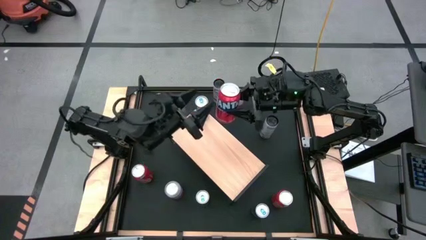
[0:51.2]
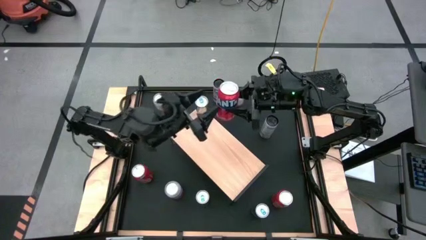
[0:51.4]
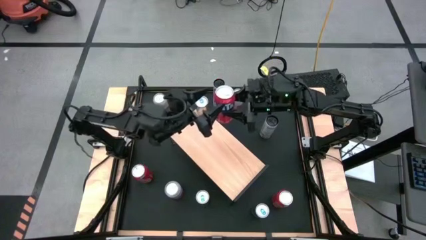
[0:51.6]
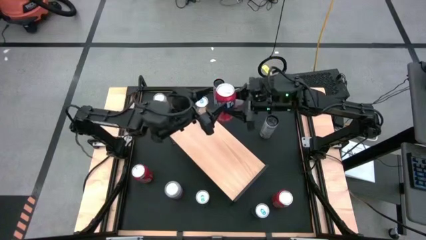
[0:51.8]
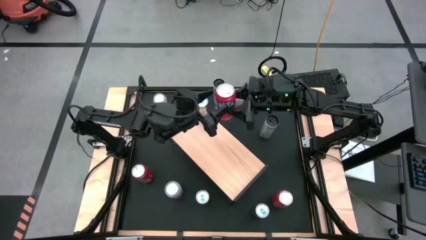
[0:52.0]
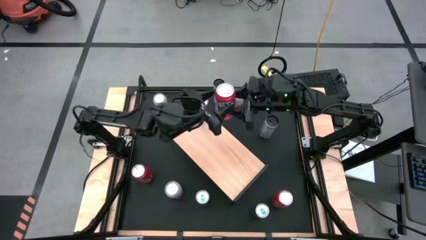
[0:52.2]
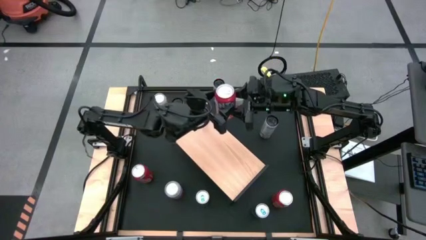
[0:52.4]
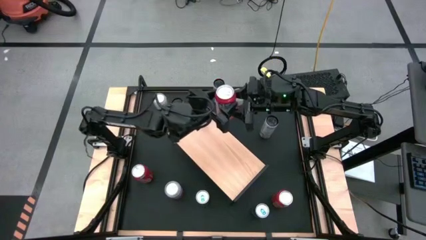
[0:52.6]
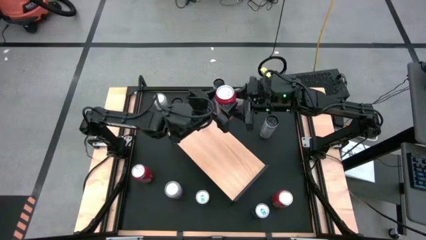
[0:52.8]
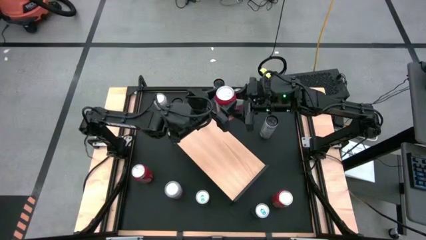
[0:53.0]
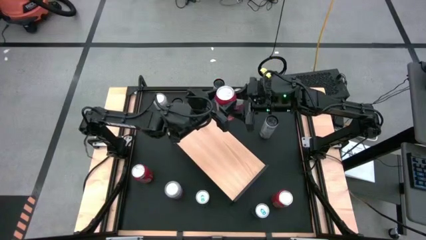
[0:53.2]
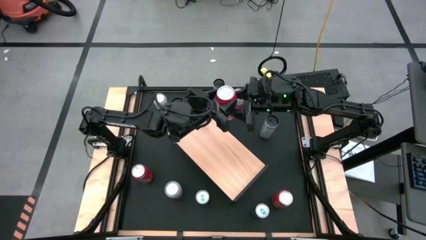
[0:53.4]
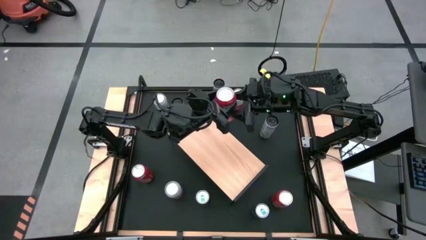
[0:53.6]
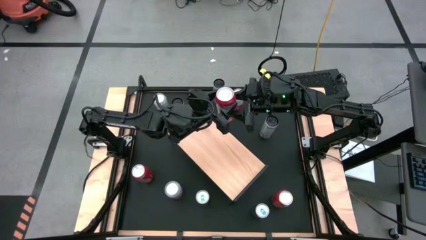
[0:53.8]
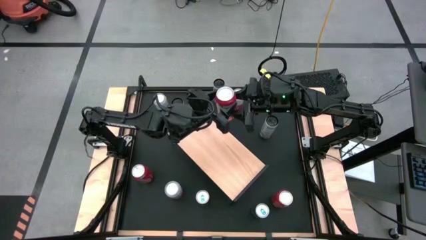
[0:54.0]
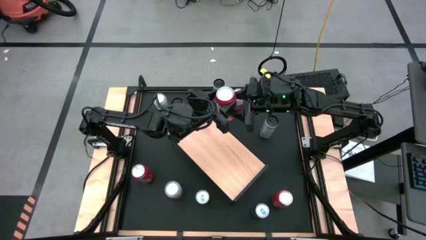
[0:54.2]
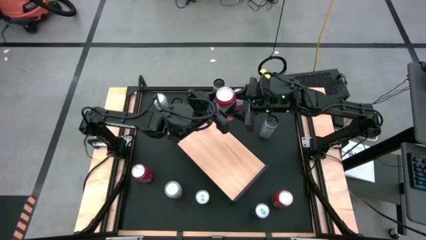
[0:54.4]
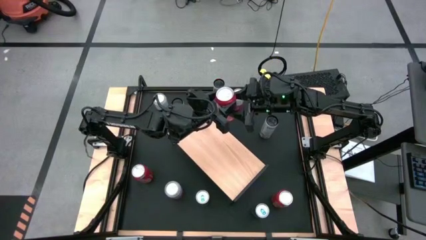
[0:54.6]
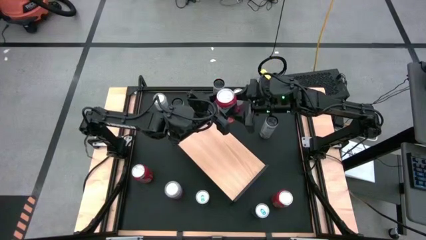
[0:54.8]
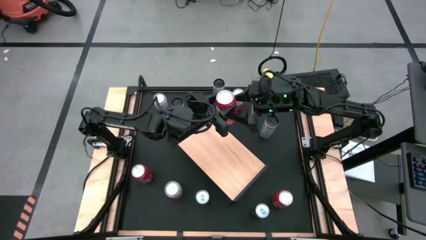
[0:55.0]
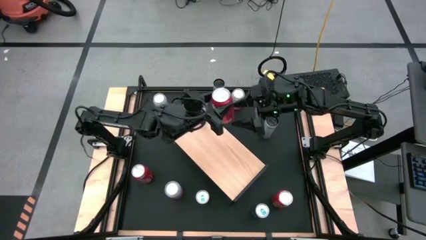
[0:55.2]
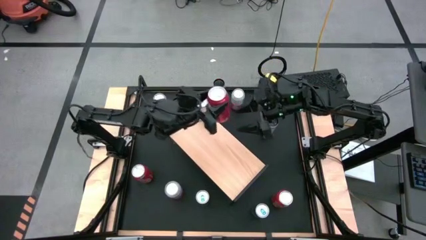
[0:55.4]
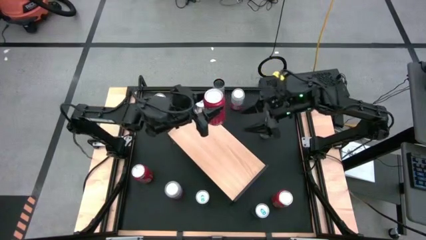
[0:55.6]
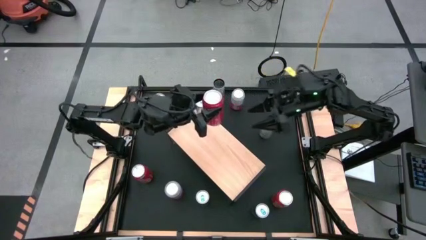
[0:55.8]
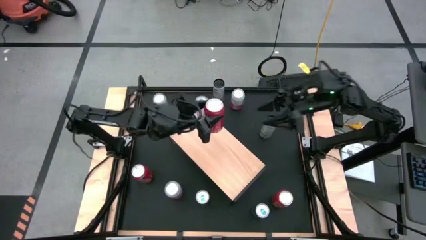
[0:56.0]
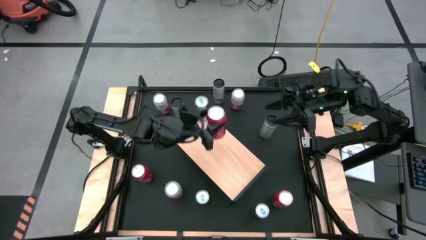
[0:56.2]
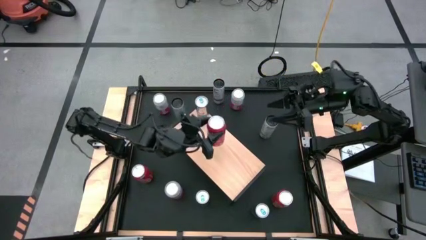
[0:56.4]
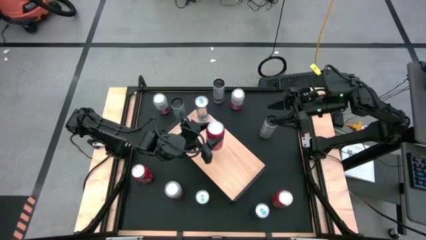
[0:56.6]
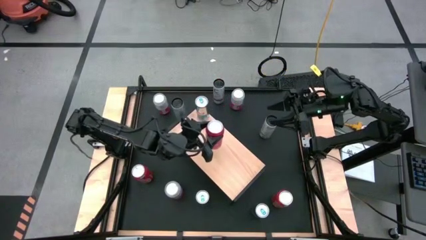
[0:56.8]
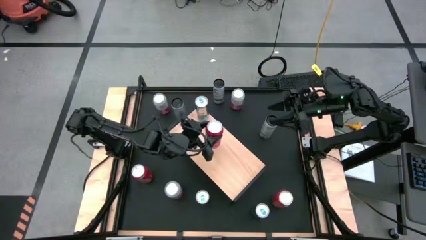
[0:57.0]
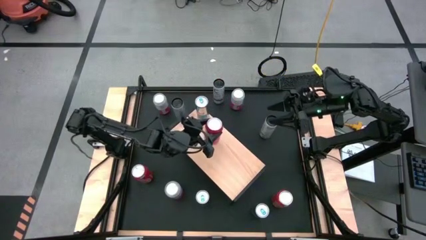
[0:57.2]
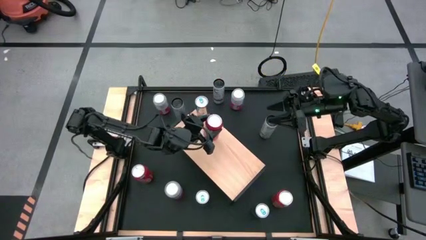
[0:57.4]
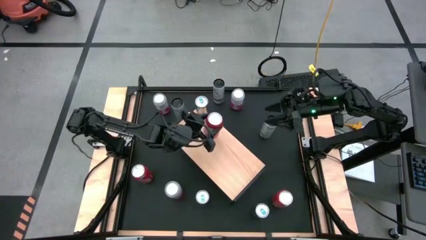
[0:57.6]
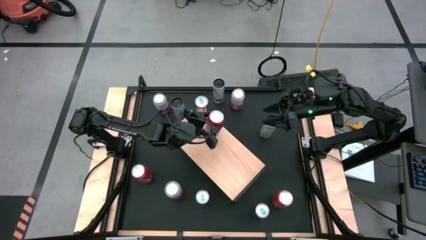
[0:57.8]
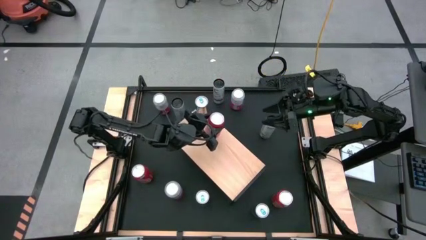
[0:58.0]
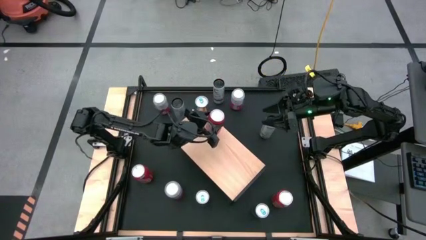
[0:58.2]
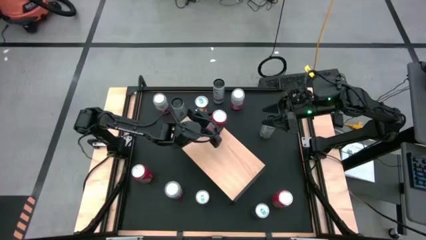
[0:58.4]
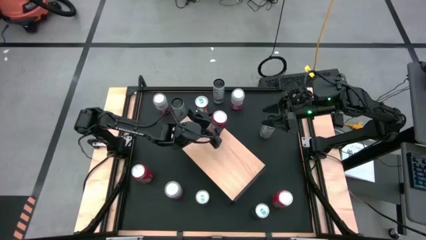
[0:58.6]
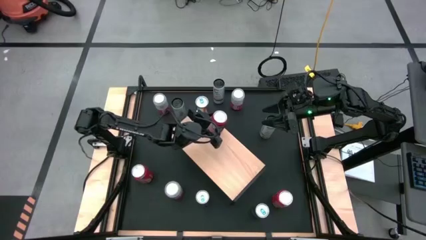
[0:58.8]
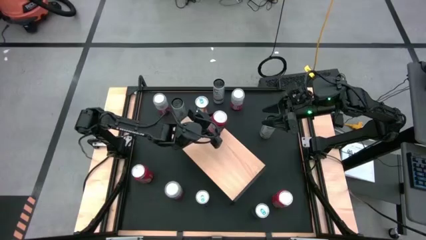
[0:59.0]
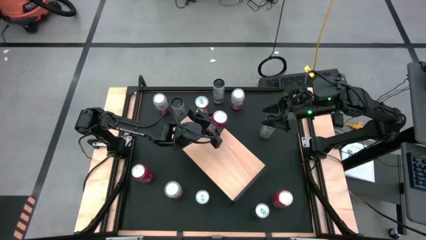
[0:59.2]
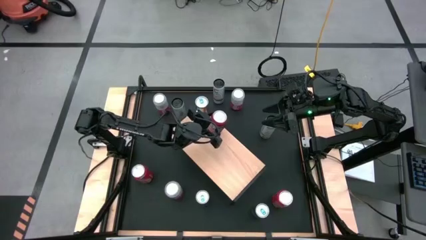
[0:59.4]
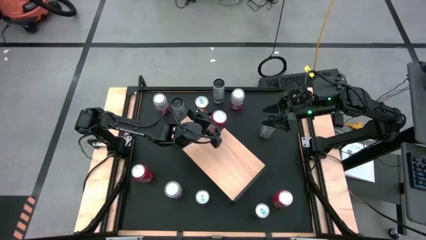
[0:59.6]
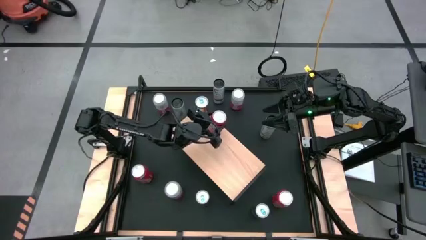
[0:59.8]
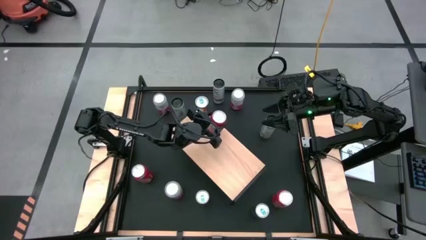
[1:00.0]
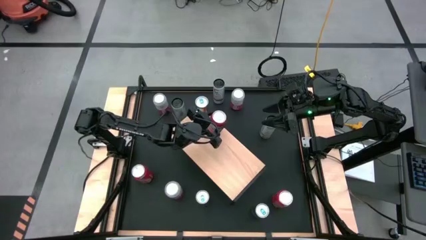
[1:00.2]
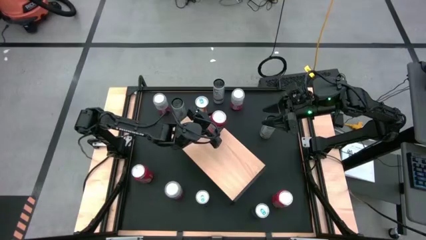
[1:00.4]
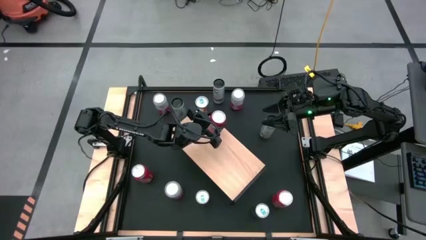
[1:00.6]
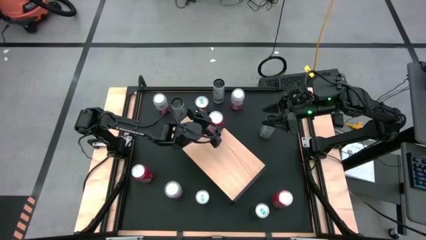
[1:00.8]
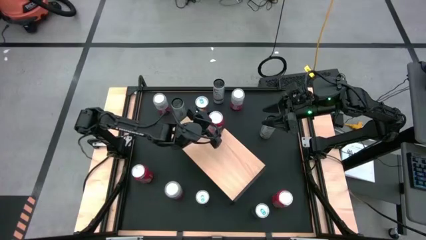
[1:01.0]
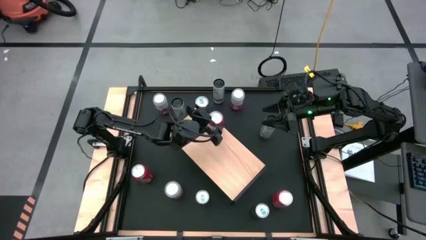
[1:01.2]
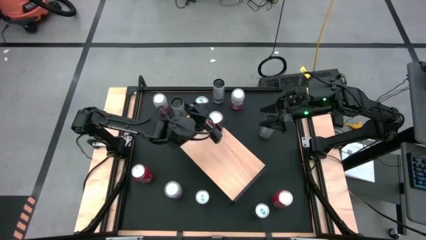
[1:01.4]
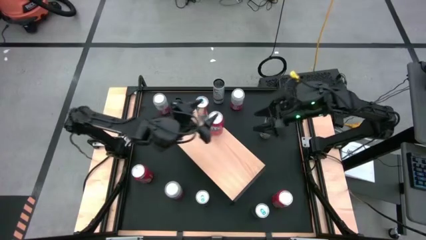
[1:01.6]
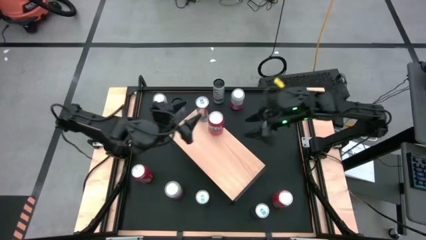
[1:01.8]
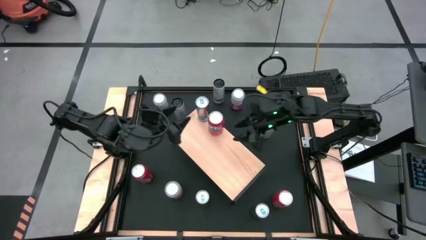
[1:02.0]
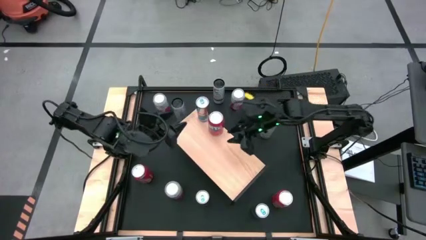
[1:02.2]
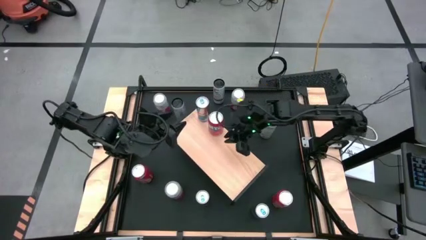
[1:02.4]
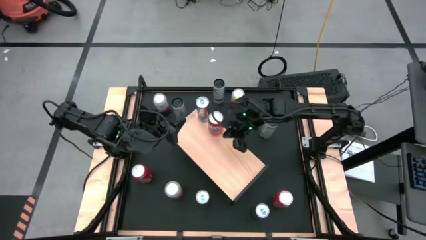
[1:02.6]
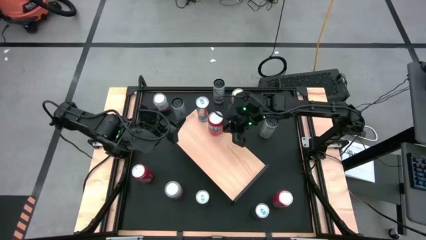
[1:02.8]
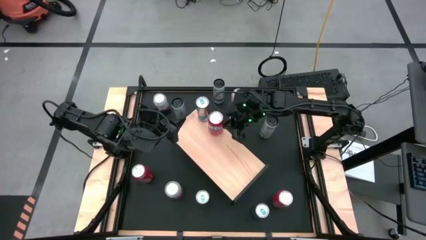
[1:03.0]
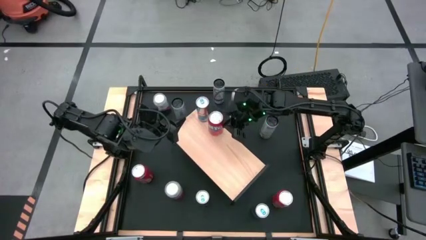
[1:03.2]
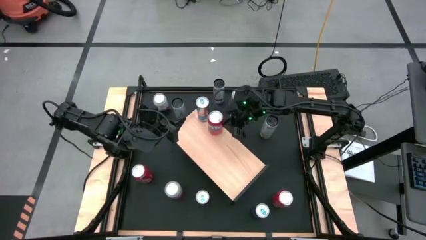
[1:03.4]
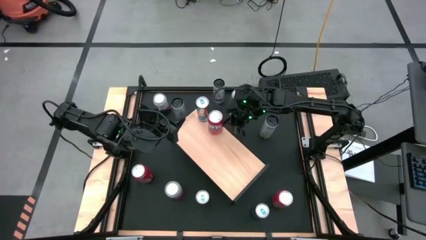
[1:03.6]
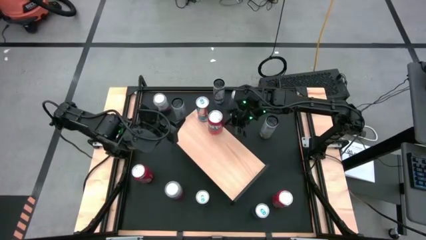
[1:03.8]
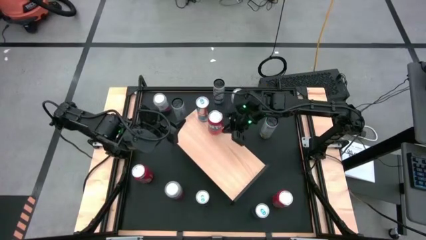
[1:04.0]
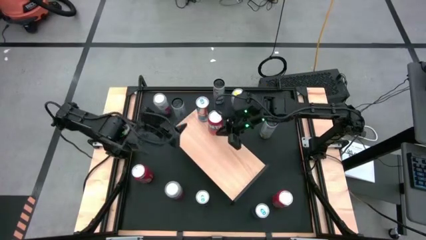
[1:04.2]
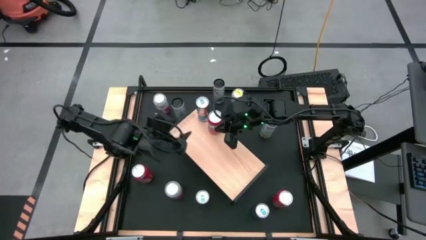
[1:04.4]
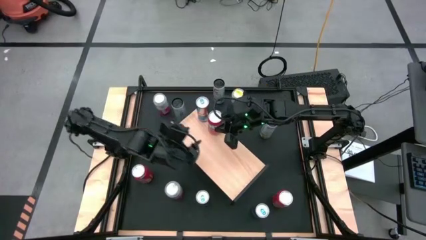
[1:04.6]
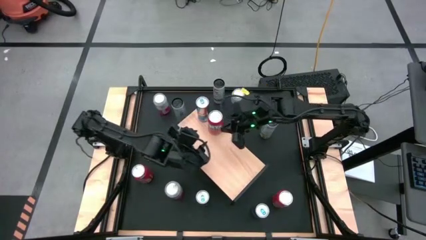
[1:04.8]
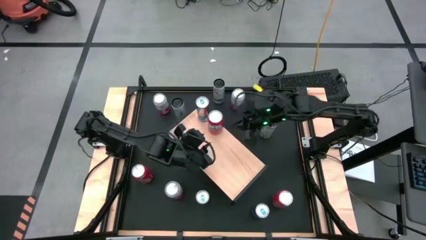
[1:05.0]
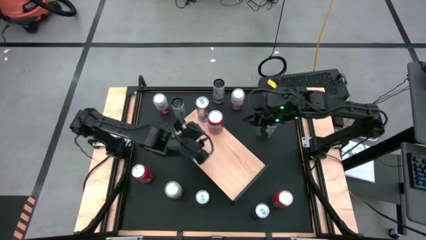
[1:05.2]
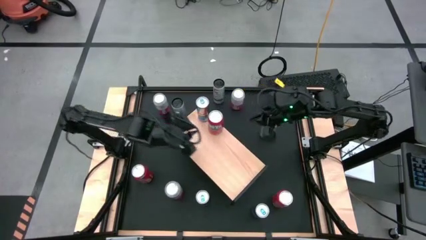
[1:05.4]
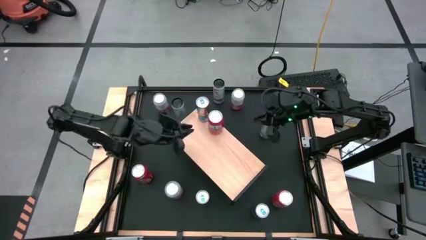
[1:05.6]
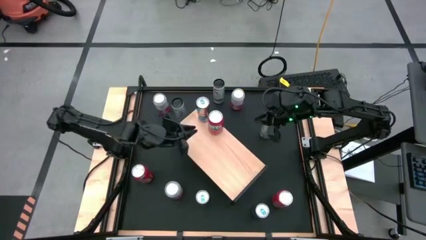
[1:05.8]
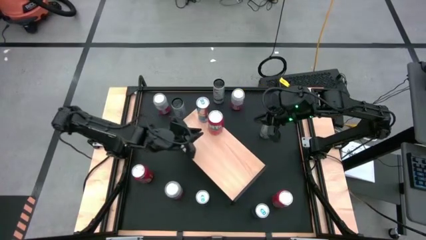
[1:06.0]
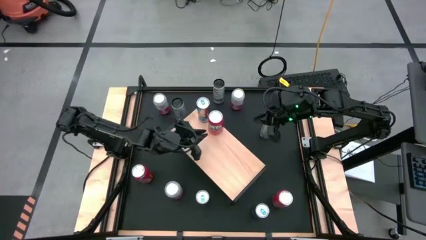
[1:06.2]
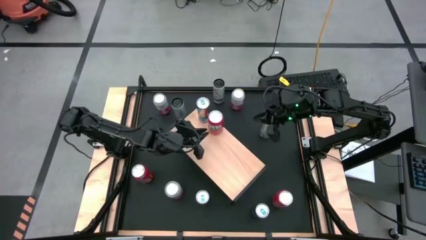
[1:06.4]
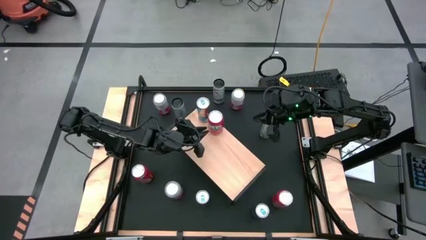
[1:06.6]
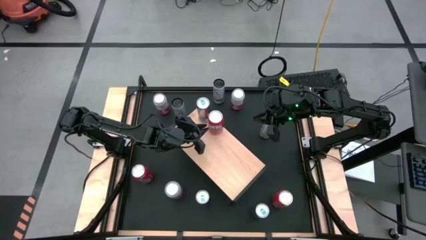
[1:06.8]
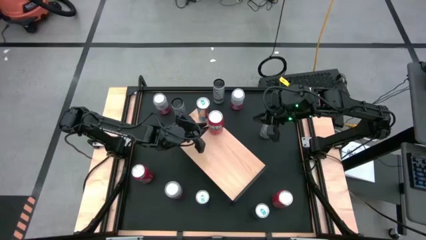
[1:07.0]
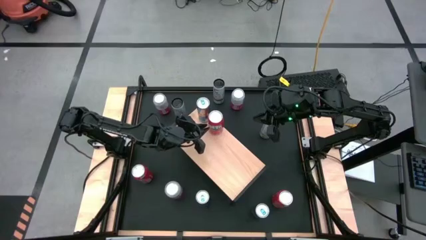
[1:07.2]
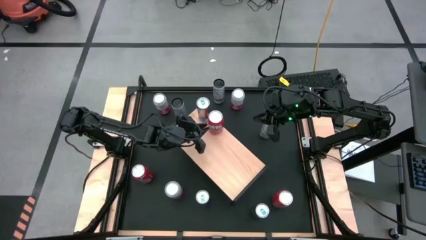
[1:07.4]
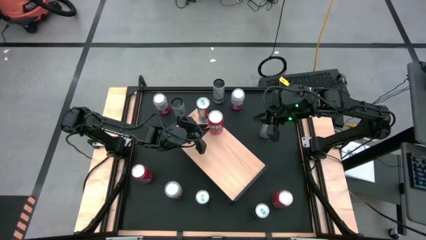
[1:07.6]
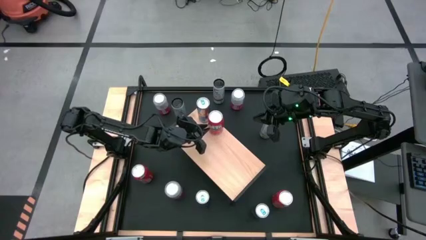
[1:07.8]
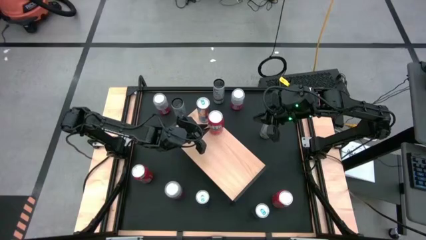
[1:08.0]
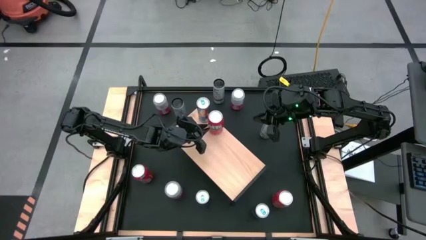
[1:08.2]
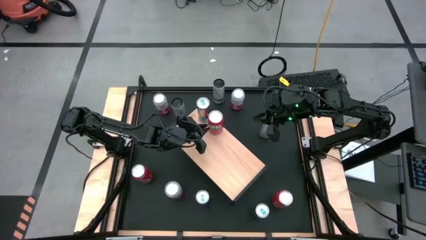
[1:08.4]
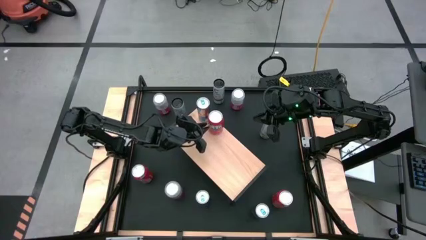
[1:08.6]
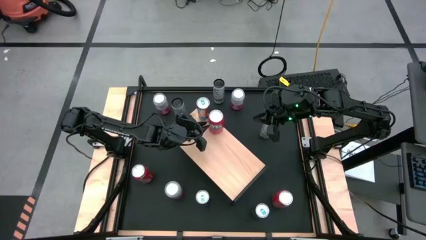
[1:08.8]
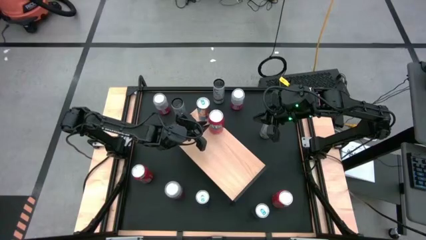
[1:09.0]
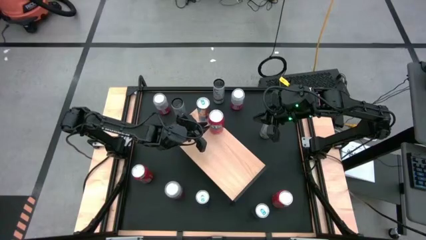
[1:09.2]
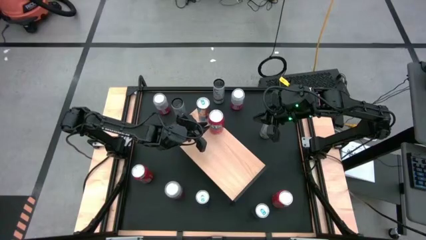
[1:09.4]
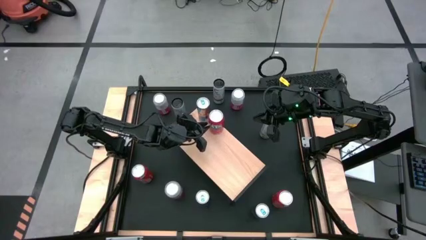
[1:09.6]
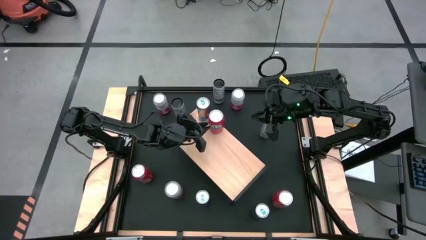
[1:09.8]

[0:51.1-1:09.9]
Task: Place canned beverage on shelf
Put the top red soda can on the shelf
